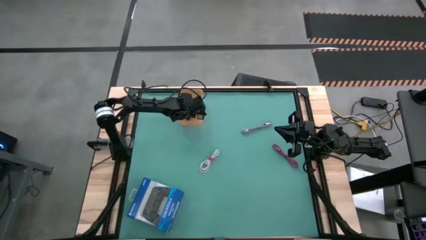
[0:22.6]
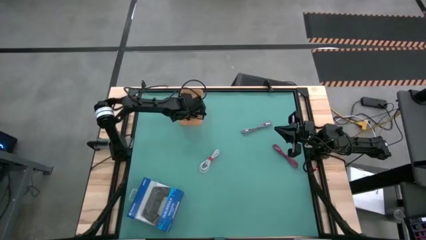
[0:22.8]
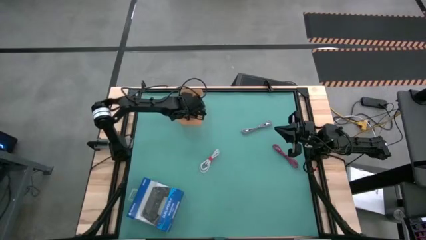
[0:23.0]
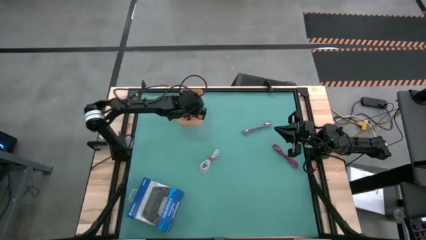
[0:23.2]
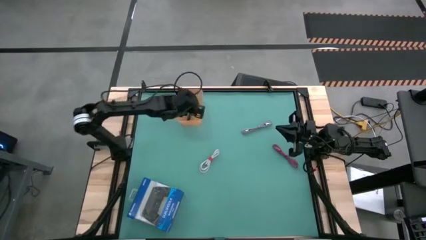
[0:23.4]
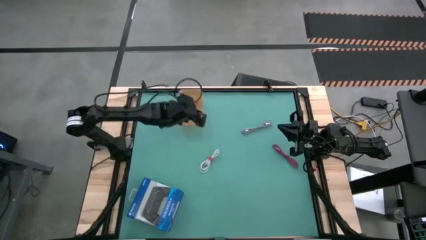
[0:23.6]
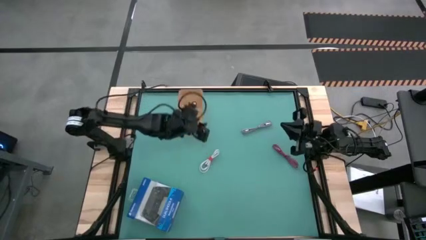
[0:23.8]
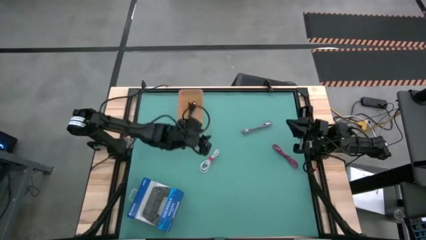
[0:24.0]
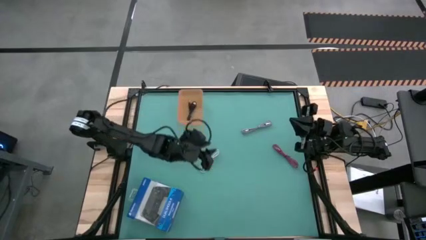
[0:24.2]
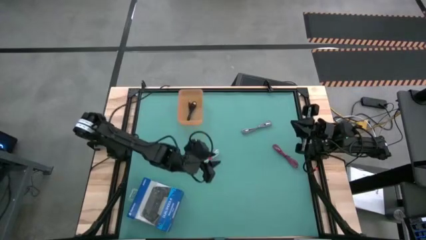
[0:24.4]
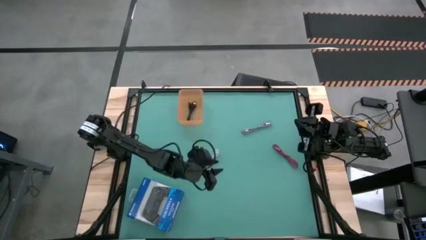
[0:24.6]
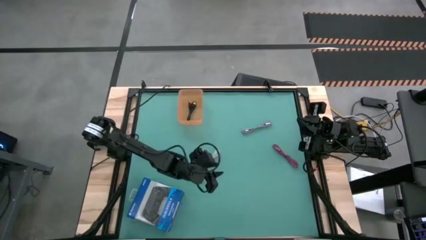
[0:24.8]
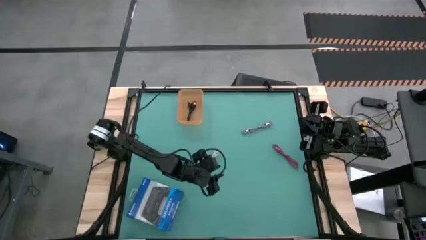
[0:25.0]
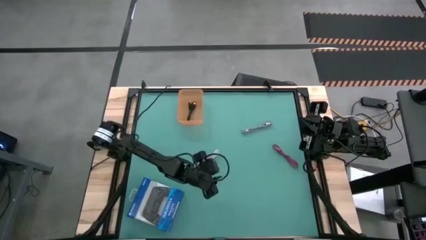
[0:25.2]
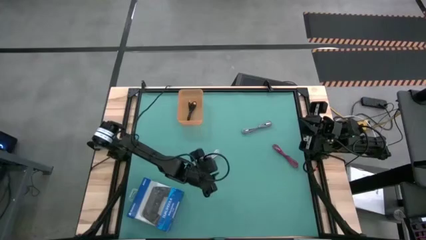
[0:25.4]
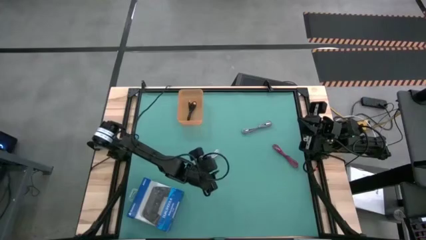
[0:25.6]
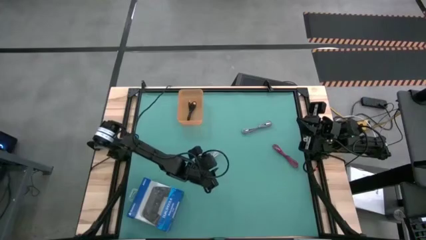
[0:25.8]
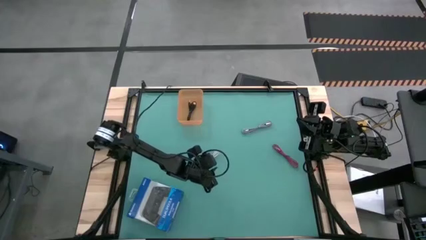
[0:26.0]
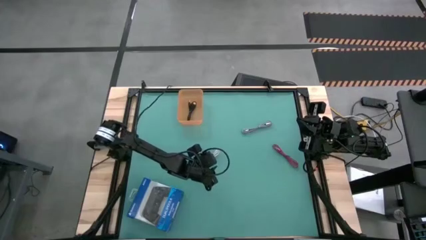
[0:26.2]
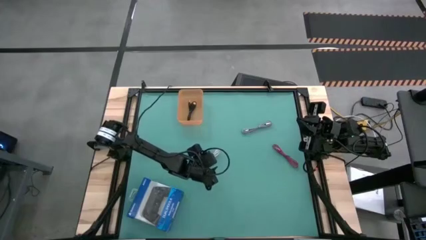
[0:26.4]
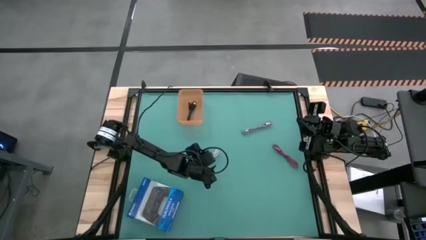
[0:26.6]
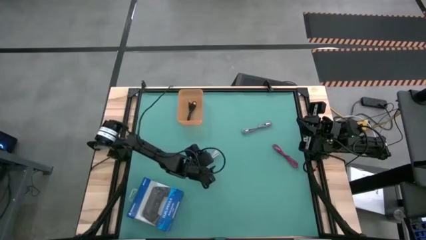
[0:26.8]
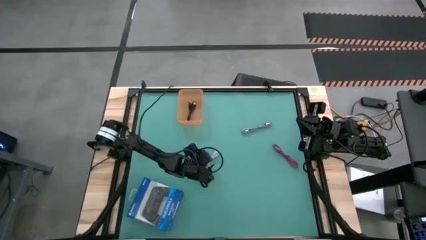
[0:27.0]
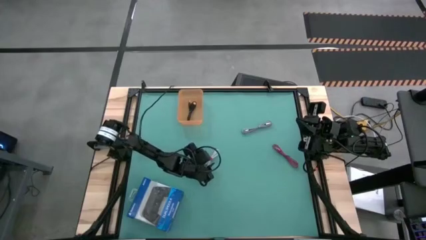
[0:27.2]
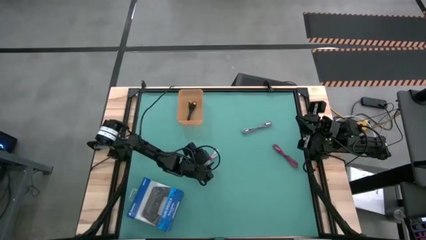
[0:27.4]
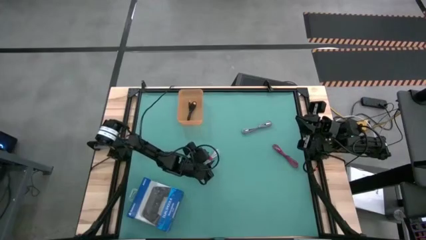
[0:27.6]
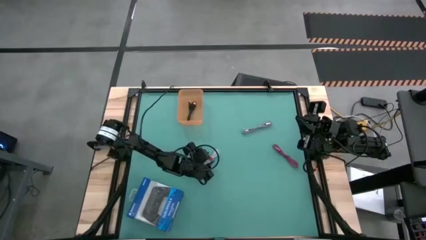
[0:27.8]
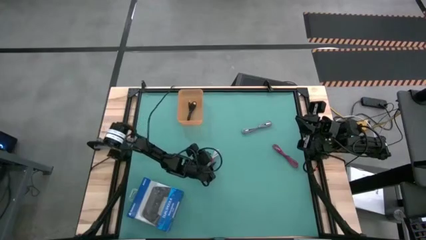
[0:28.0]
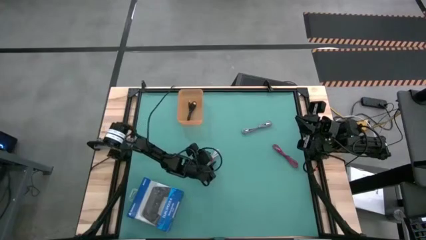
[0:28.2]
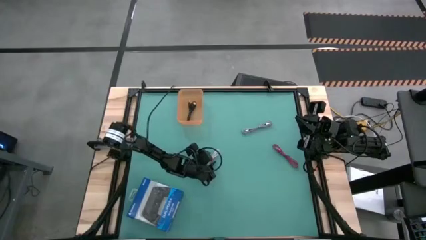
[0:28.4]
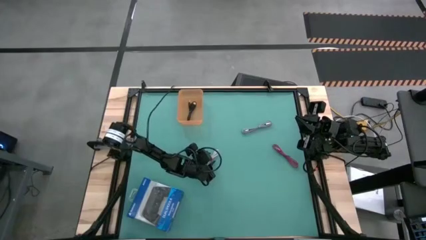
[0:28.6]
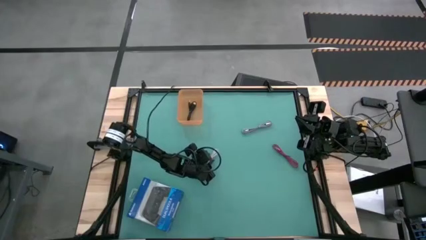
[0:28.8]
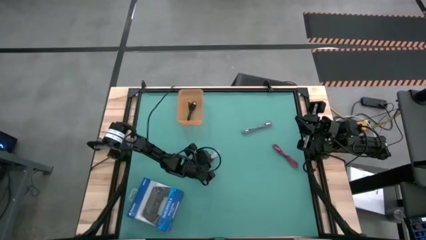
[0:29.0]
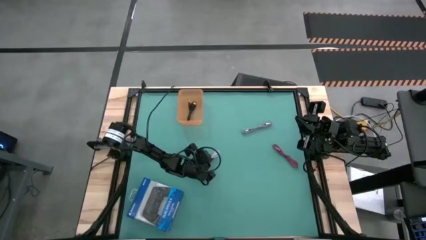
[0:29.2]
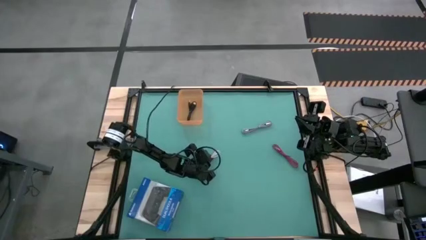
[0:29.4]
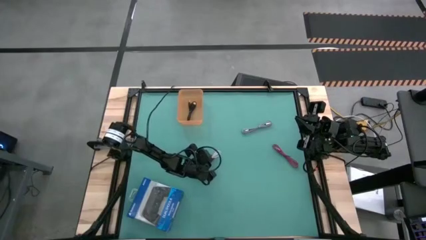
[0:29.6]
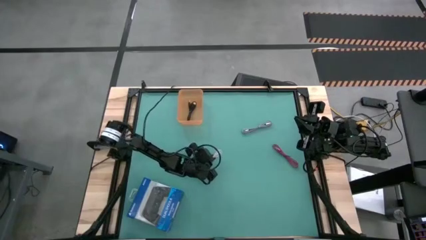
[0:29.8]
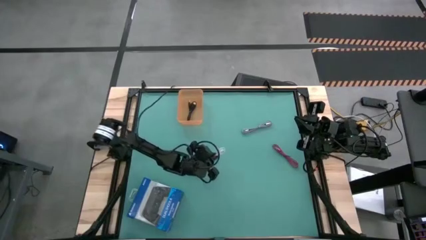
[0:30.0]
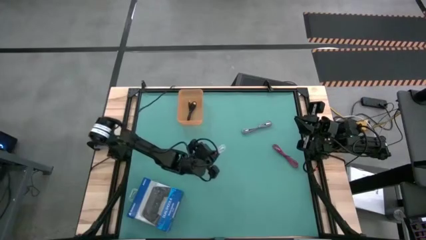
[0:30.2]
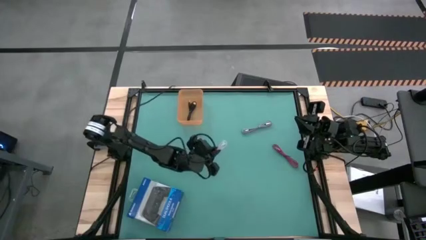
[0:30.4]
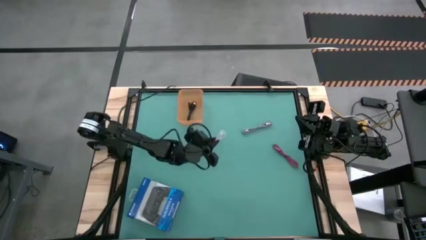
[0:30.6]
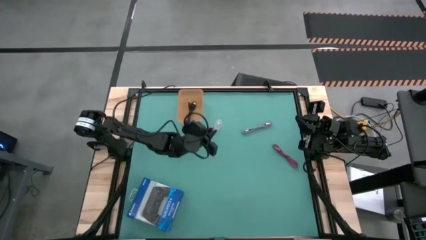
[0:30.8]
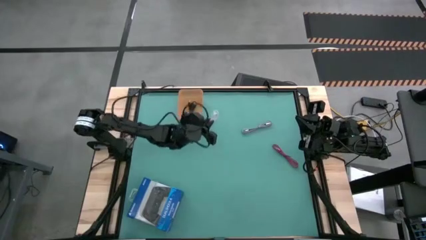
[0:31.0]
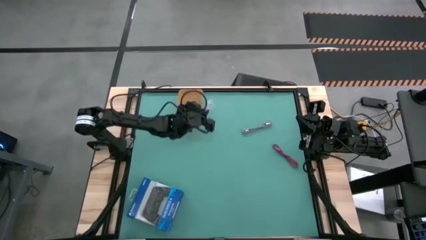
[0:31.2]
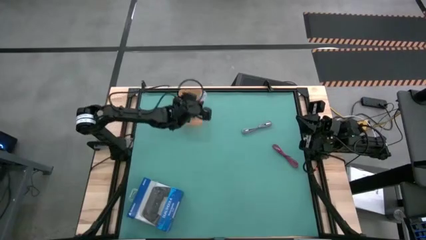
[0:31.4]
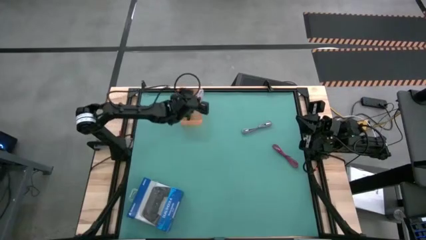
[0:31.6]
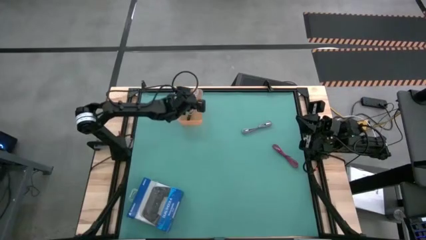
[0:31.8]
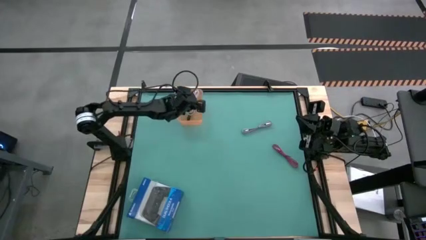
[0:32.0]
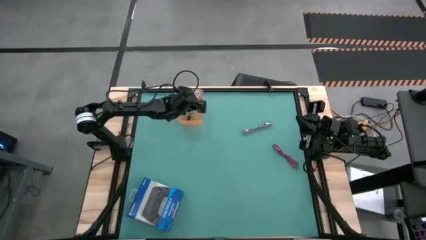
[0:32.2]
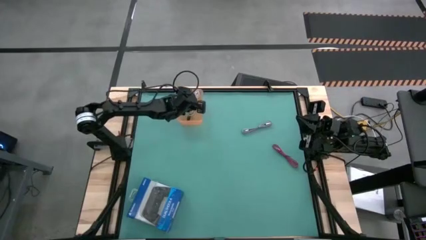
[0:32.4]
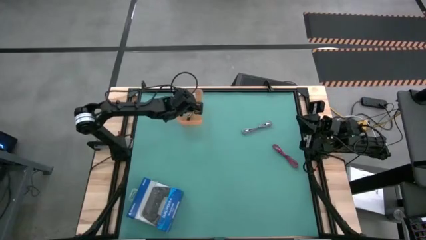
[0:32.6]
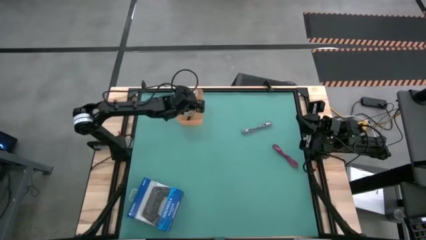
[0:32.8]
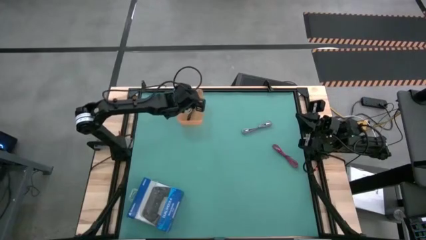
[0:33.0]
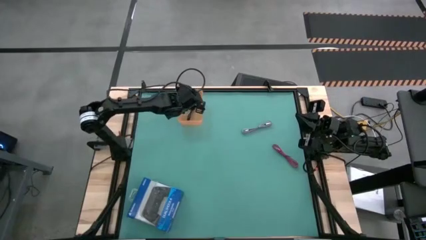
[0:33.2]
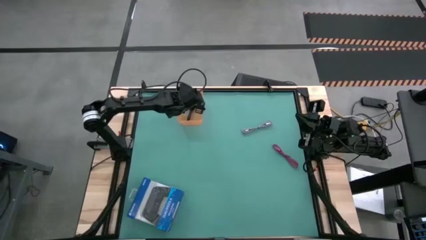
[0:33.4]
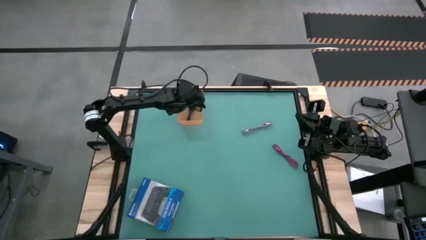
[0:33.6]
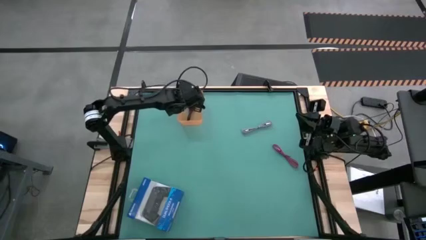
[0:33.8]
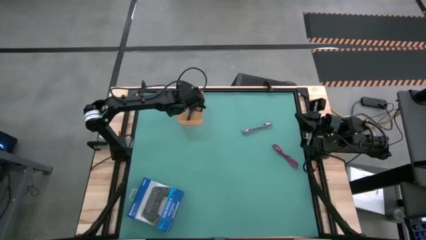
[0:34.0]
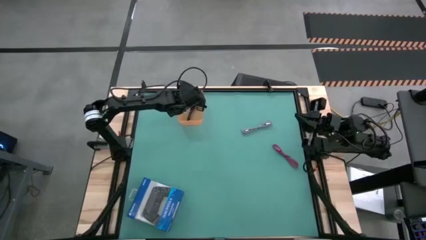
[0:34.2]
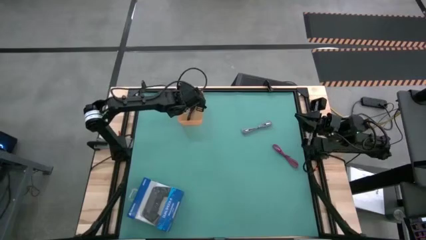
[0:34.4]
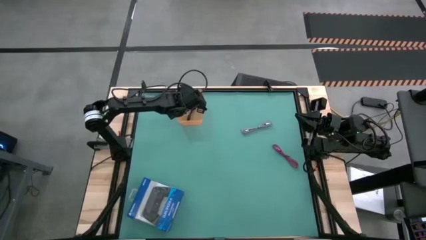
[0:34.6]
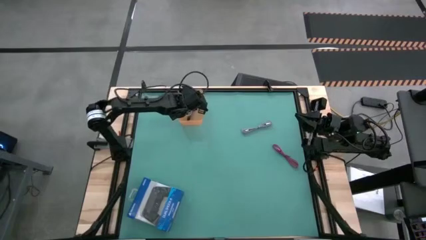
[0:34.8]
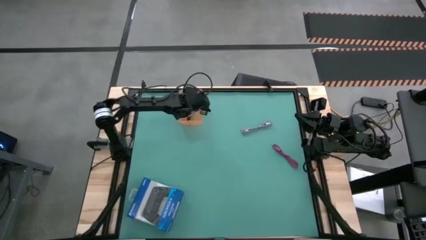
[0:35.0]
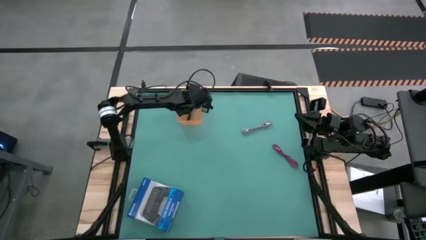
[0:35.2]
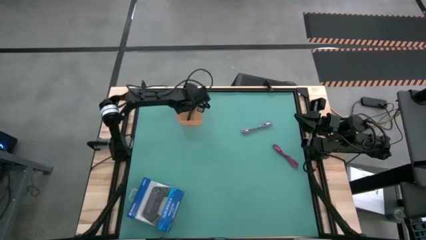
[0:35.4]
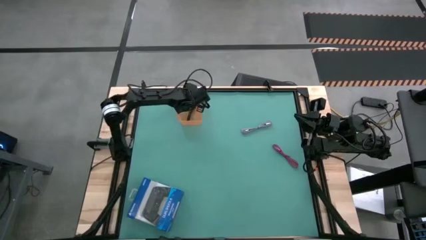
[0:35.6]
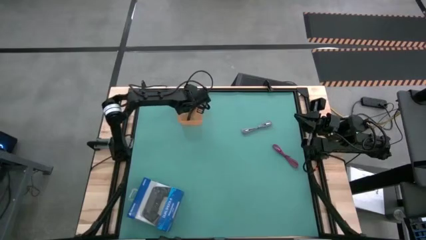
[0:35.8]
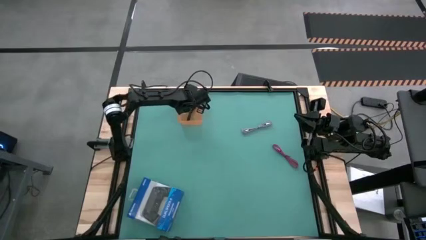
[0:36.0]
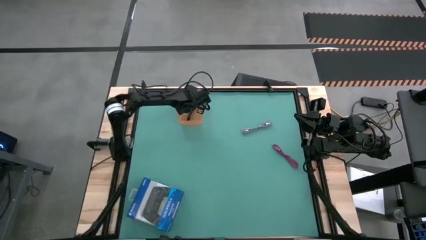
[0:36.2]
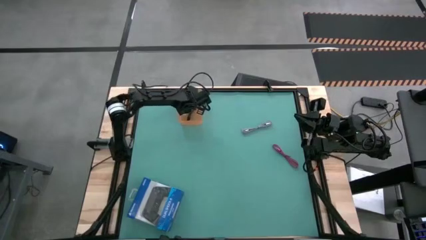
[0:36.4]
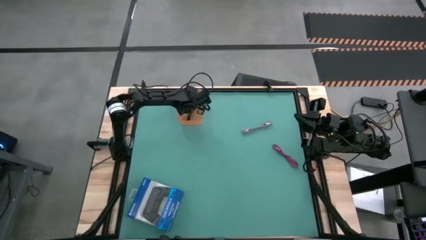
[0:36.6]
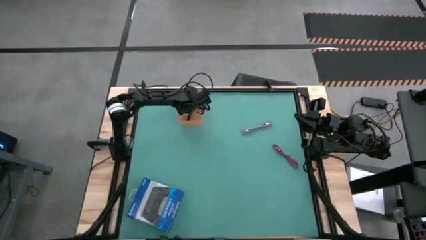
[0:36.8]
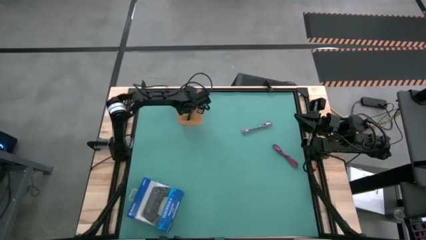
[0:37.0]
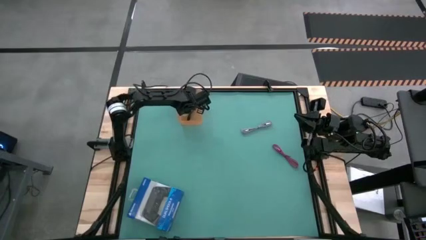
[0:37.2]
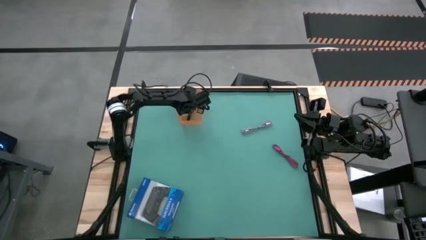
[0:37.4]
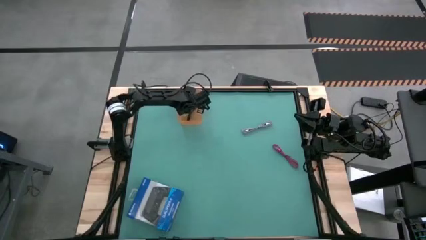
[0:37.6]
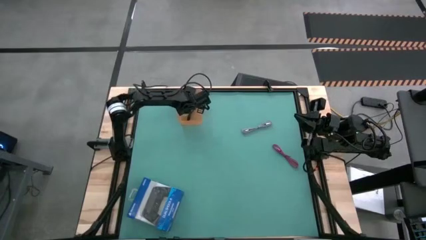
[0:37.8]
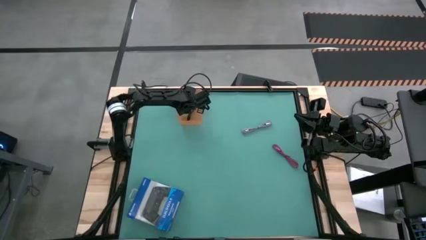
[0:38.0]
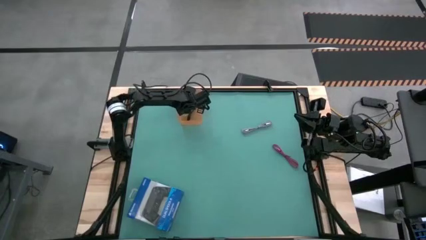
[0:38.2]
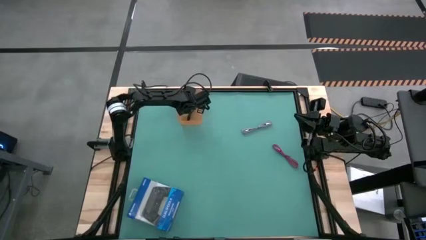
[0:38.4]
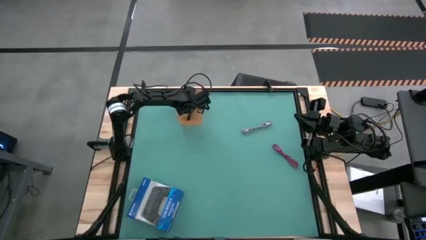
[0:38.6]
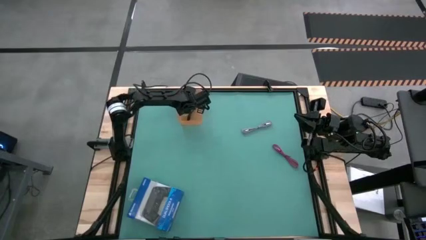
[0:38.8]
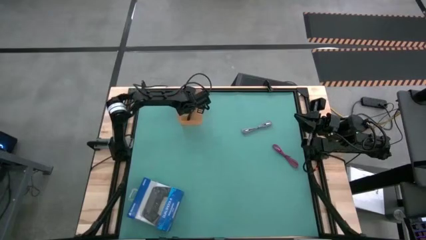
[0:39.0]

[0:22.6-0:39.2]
Task: Pick and place USB-C Cables
Put the white charger cable into the orange bin
